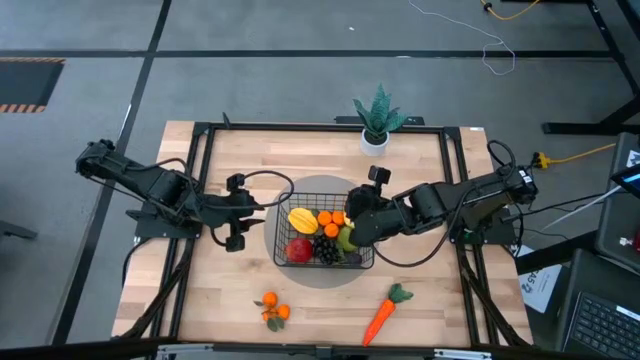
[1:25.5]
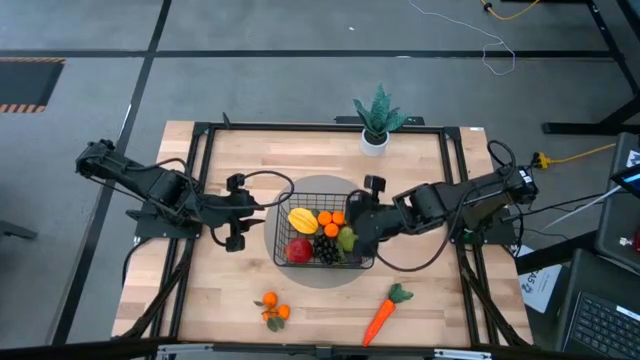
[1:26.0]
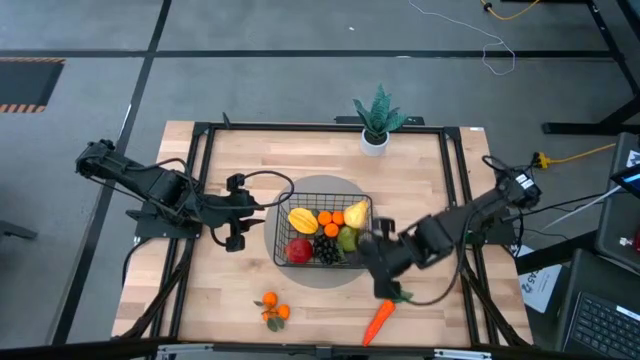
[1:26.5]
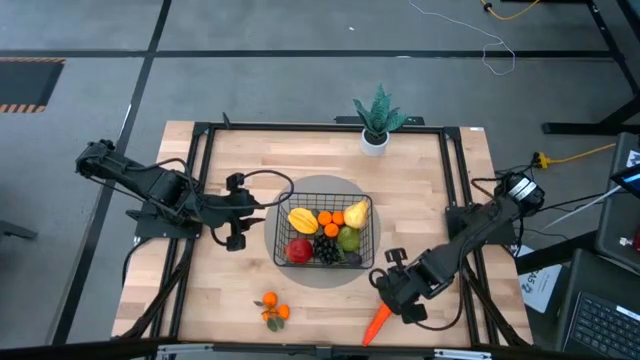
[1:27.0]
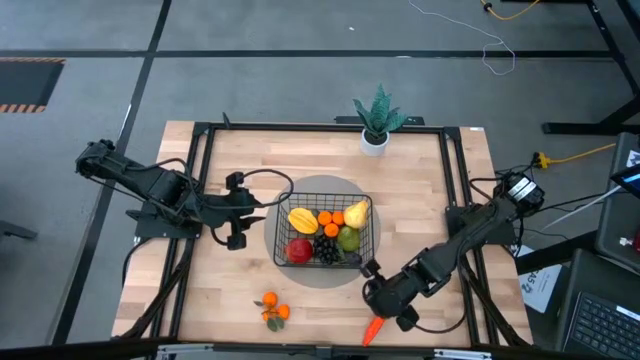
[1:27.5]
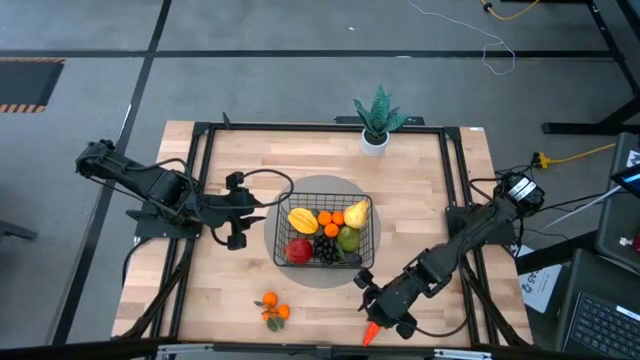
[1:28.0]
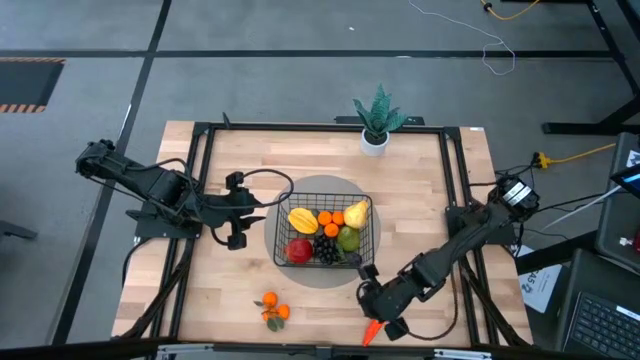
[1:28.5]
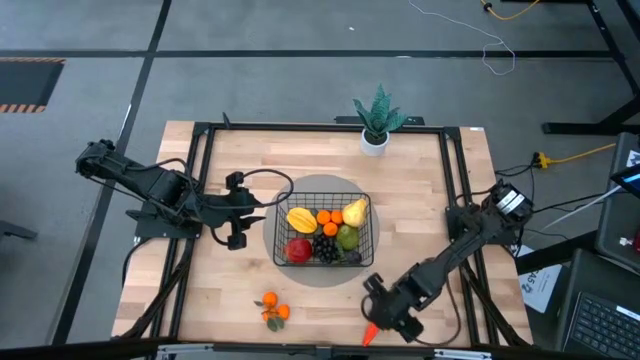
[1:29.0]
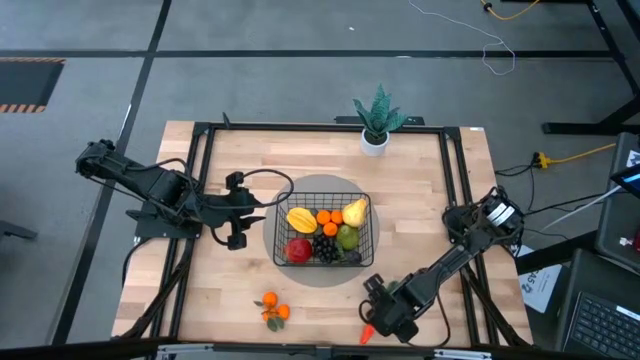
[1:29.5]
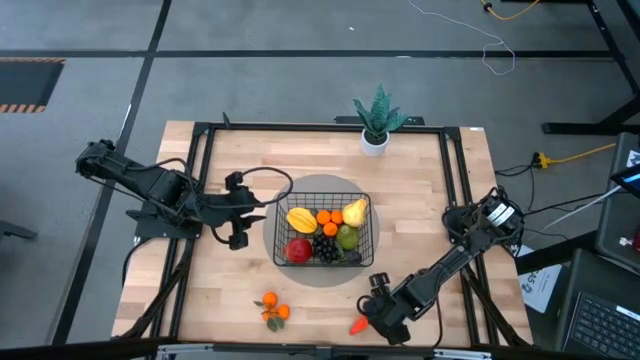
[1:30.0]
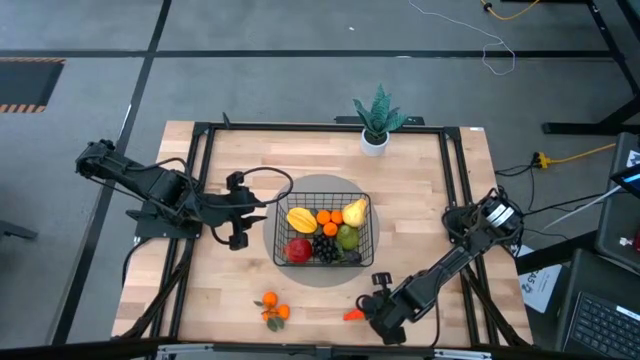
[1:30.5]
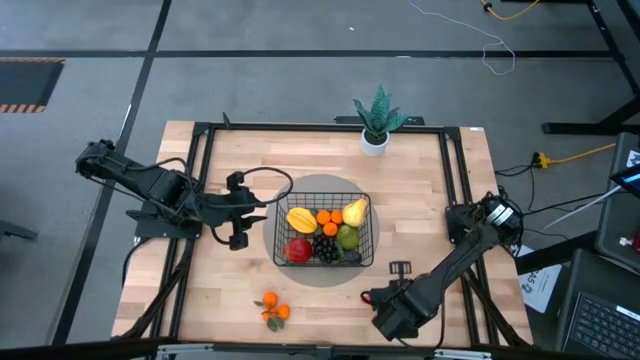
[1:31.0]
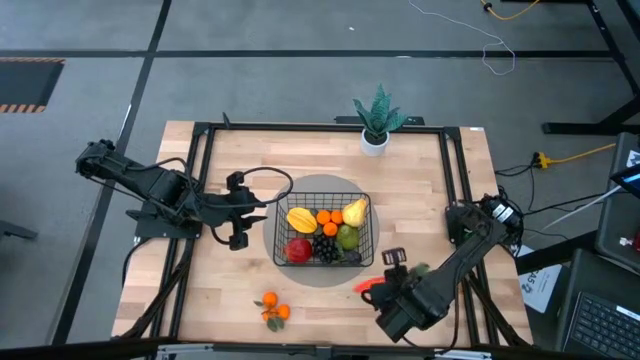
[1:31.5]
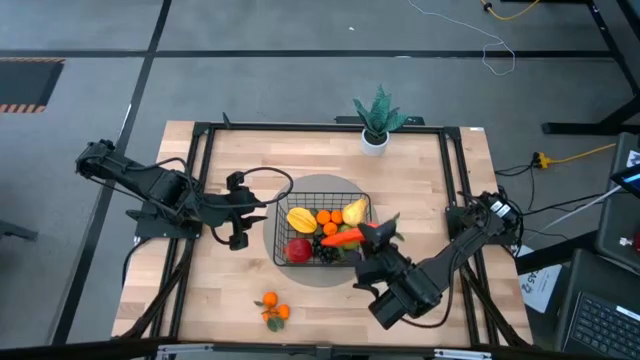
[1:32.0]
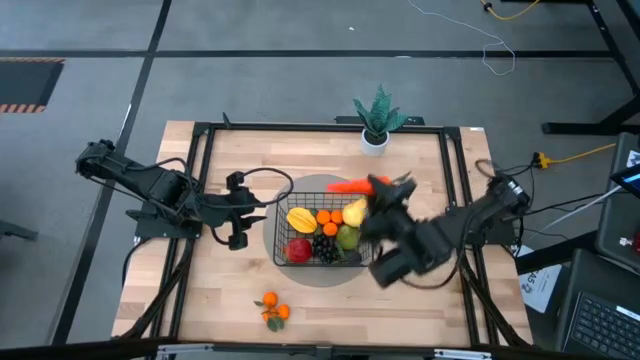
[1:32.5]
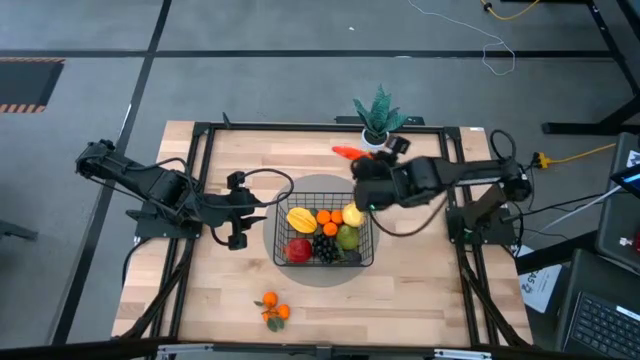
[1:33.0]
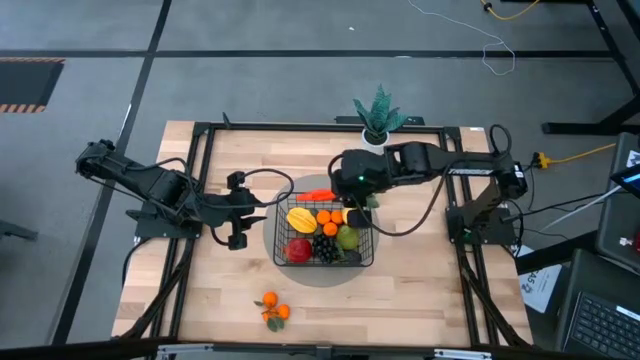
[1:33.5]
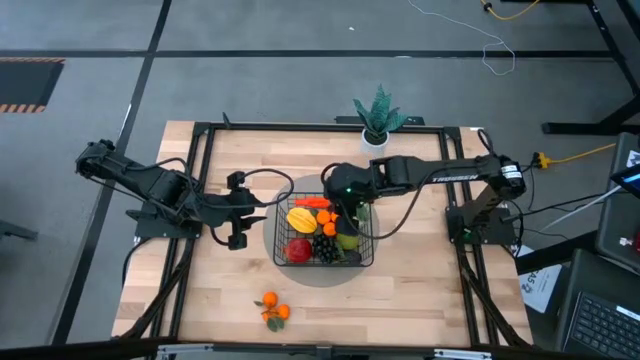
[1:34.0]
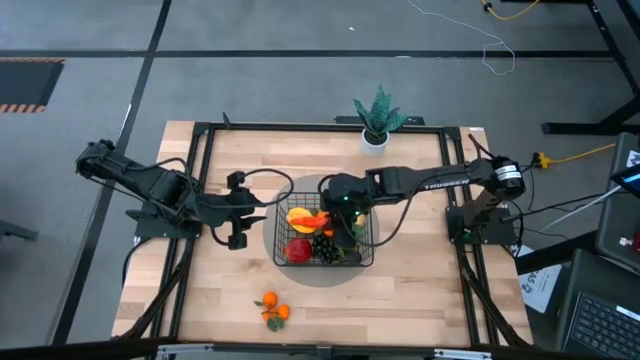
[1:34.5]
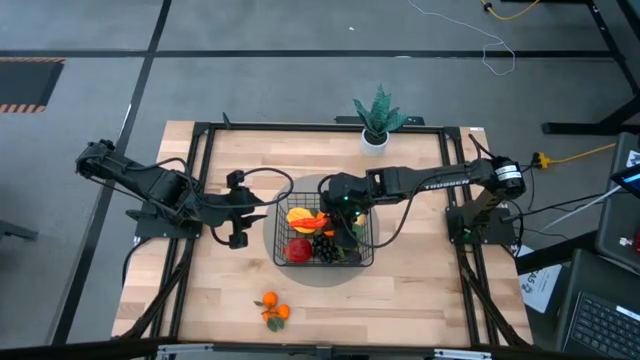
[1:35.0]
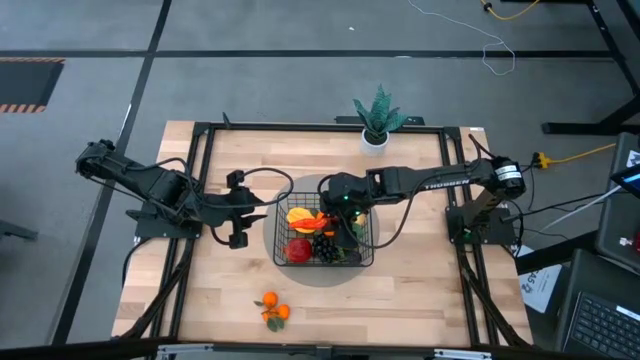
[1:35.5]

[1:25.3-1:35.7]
Task: Build produce basket
Put the carrot into the black wire basket

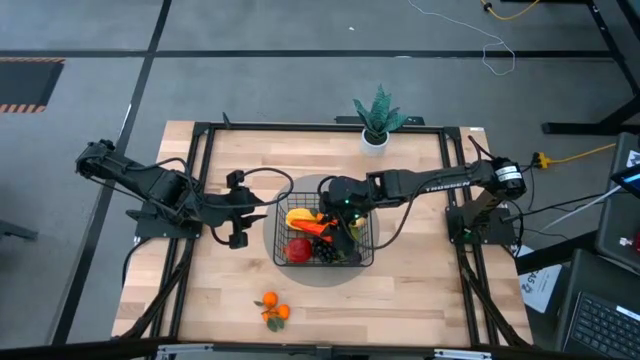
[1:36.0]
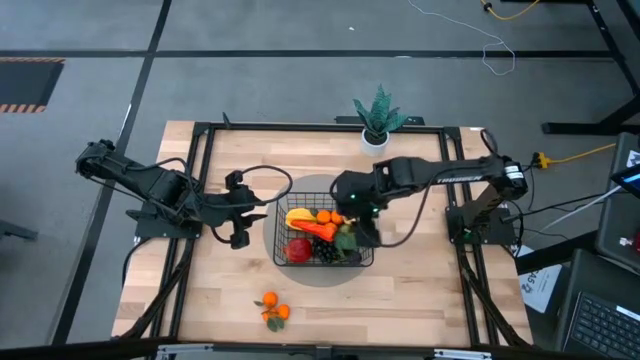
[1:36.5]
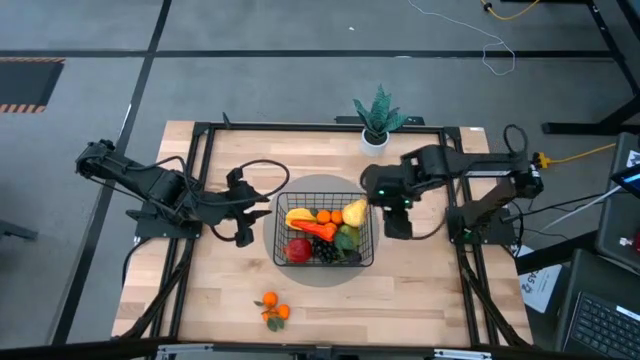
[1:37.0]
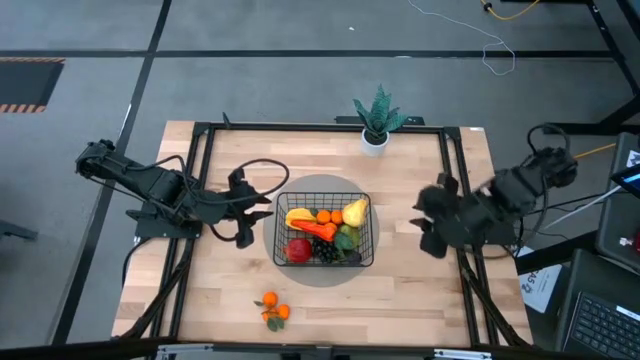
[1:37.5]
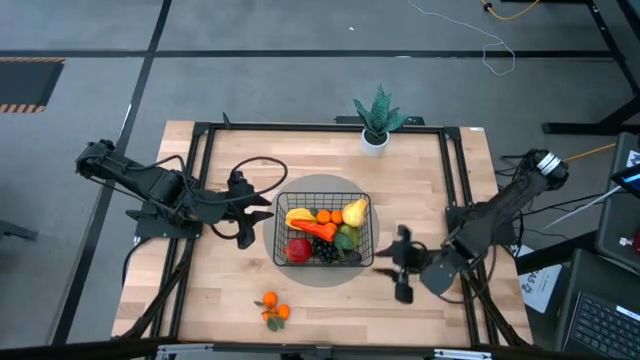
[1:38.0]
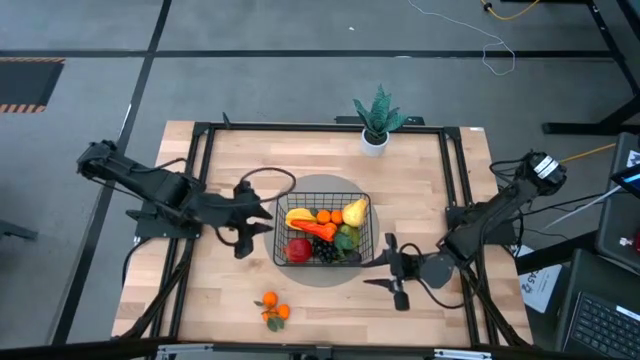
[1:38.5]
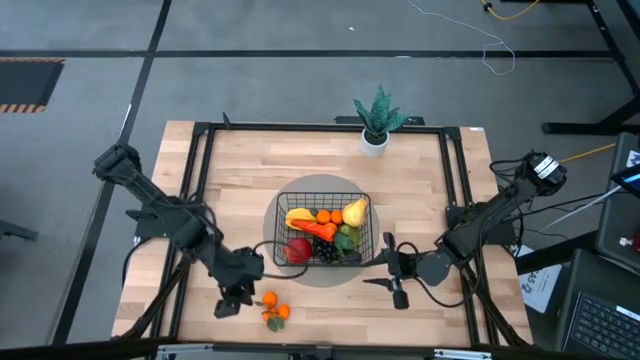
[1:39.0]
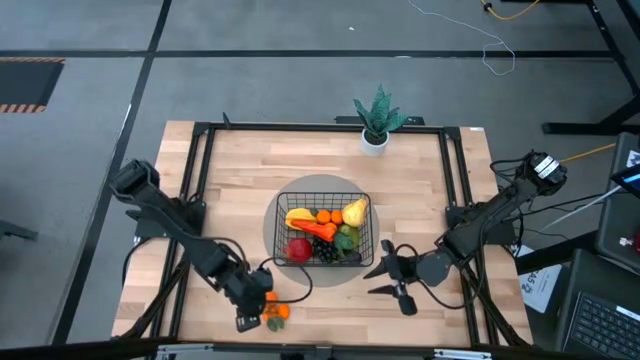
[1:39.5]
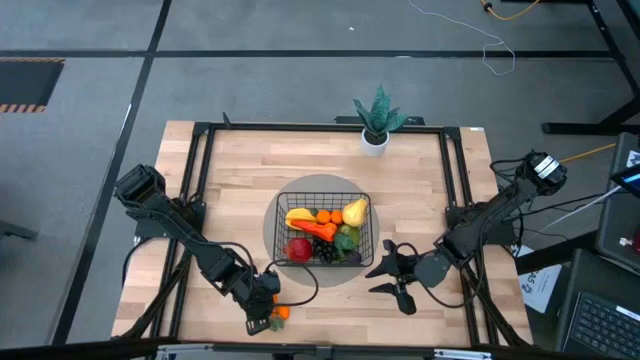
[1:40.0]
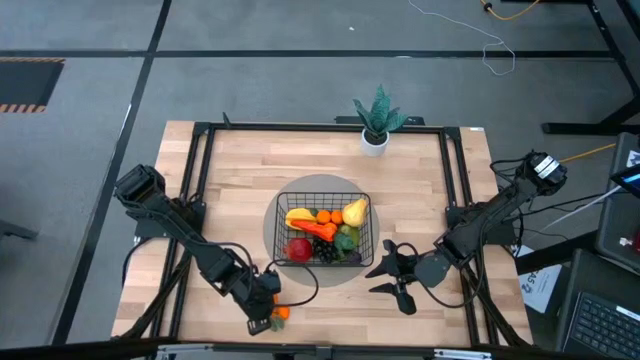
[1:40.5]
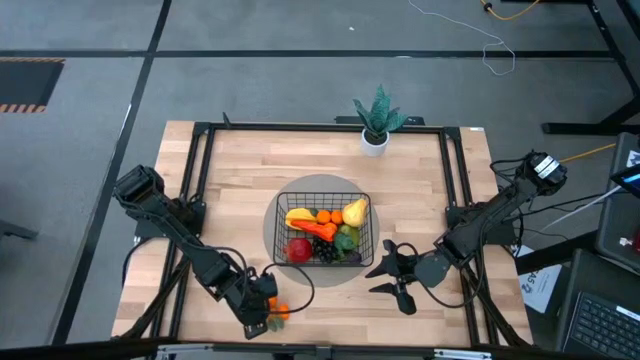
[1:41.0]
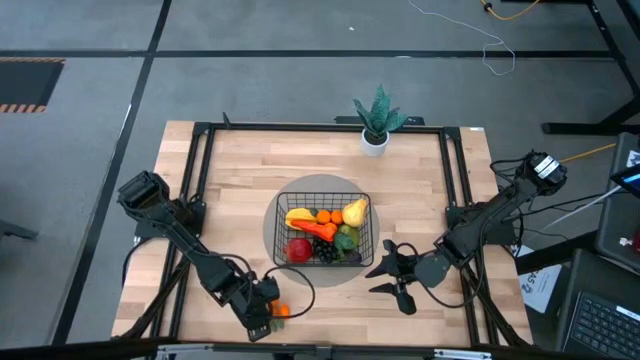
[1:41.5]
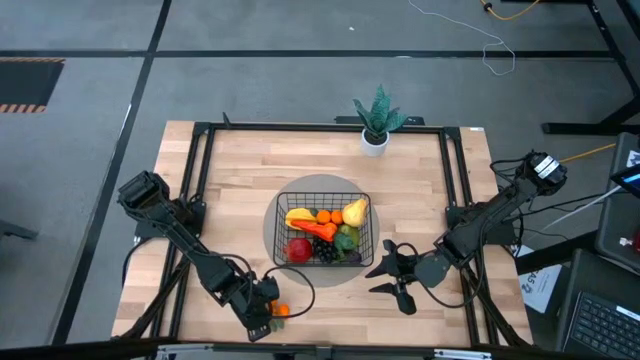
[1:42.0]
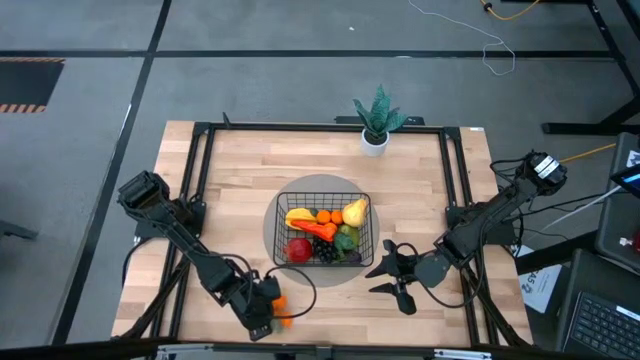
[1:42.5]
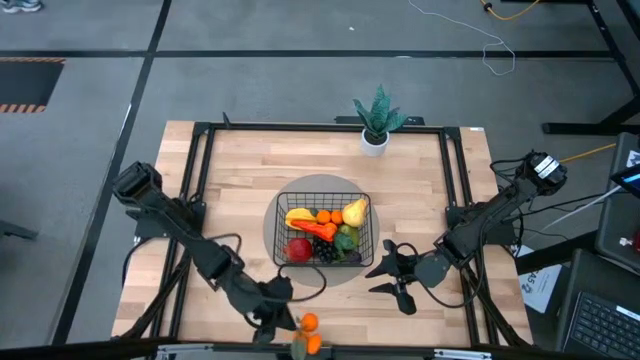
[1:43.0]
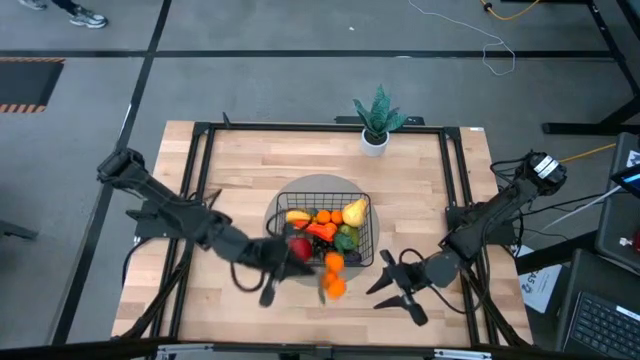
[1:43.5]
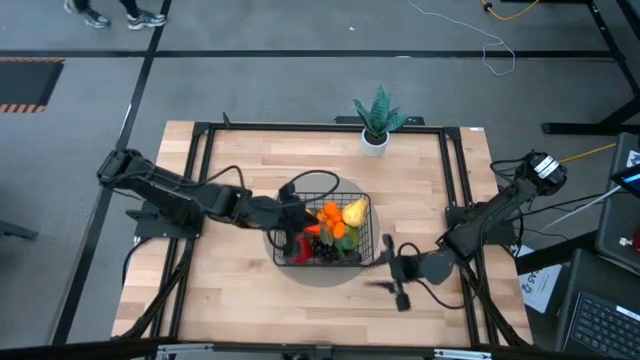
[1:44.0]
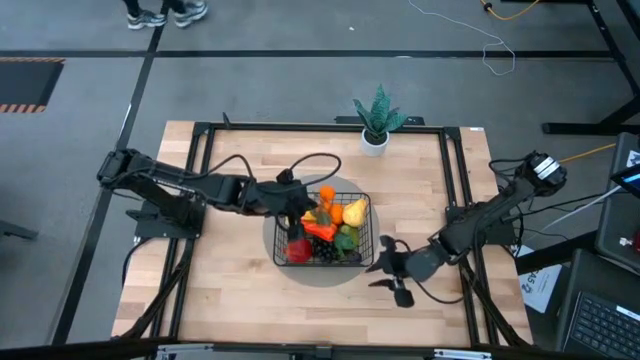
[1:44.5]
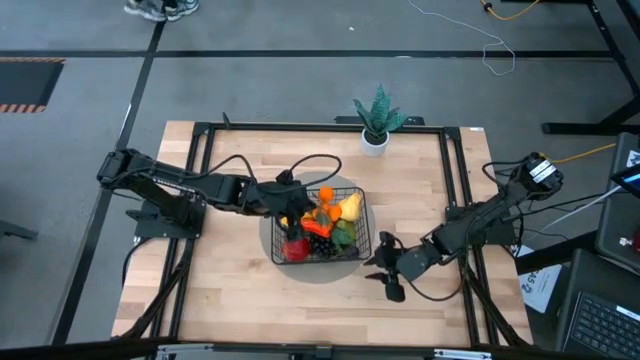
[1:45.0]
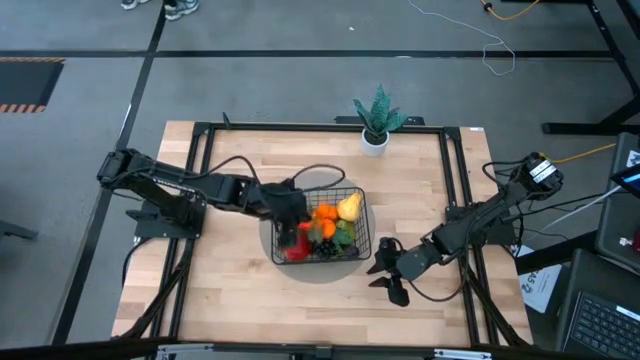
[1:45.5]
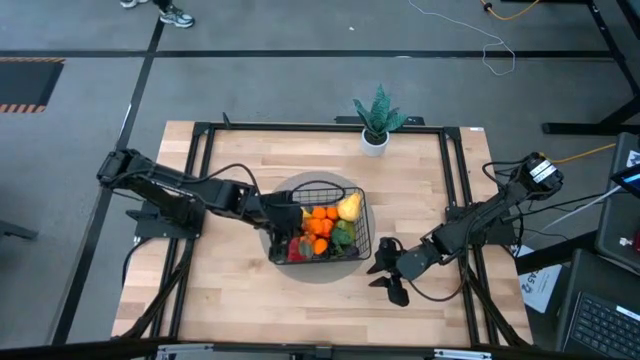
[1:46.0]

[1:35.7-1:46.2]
Put the tangerines into the black wire basket
